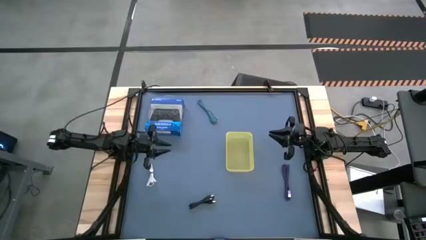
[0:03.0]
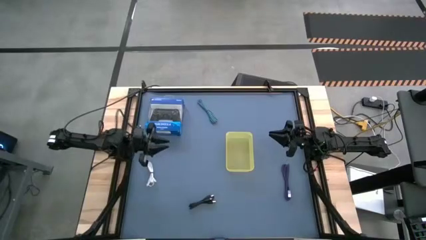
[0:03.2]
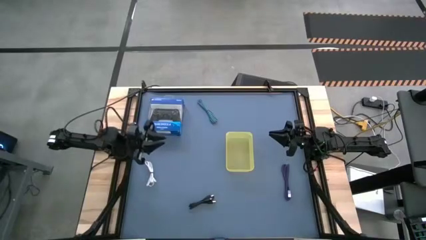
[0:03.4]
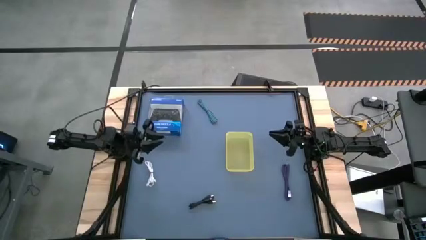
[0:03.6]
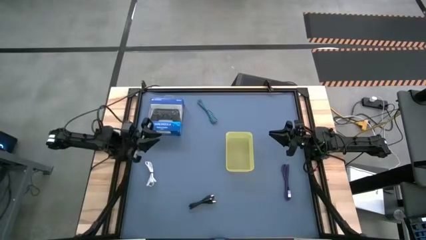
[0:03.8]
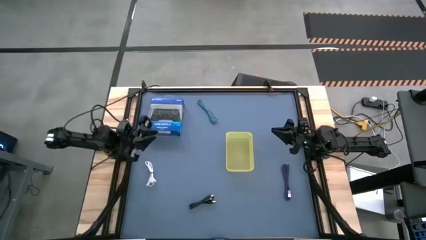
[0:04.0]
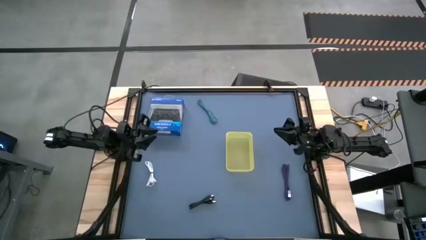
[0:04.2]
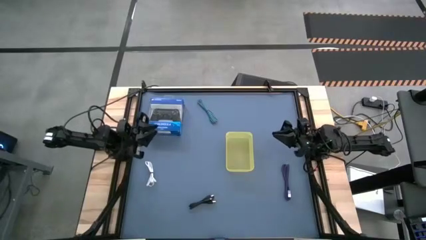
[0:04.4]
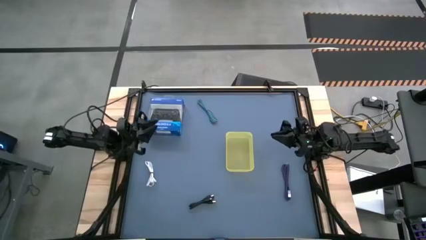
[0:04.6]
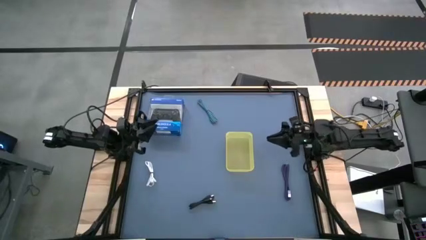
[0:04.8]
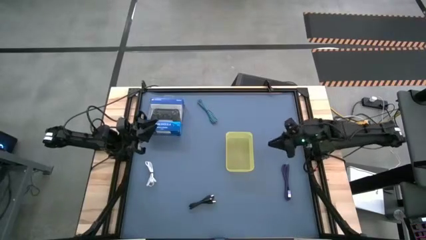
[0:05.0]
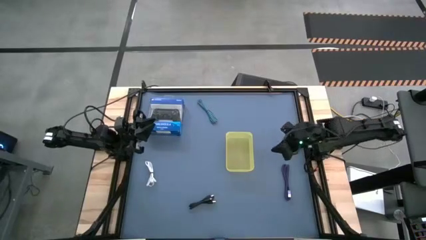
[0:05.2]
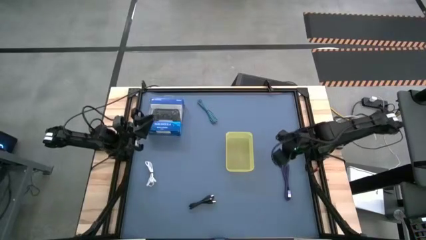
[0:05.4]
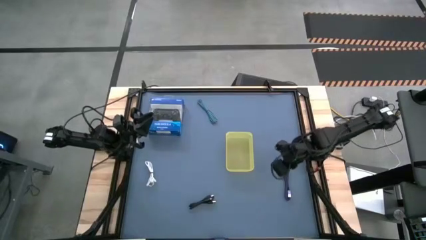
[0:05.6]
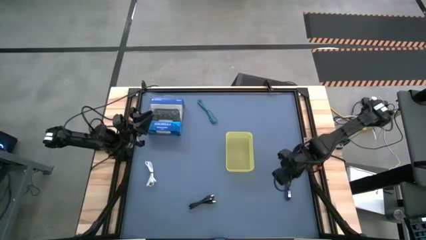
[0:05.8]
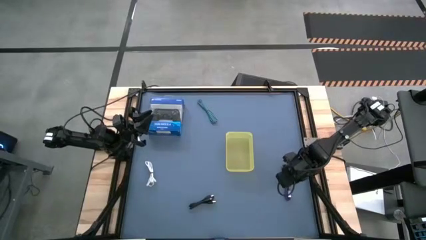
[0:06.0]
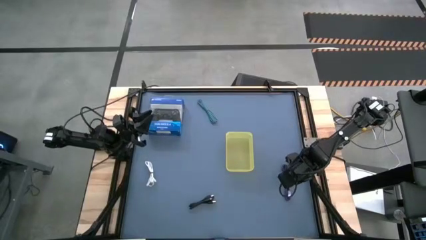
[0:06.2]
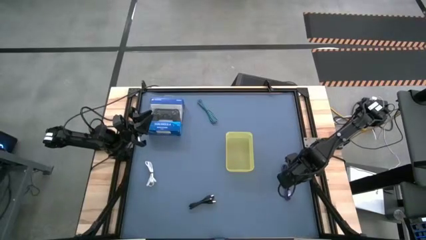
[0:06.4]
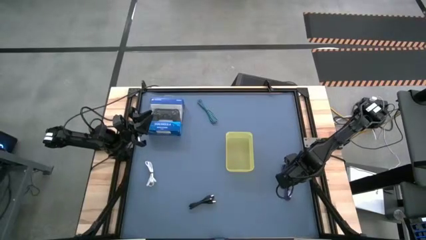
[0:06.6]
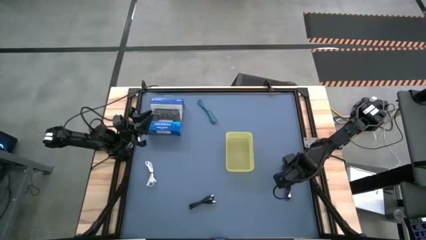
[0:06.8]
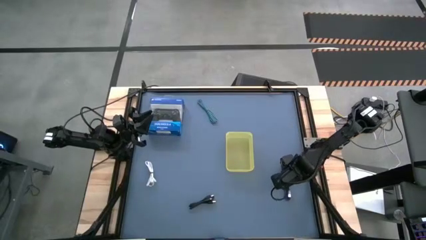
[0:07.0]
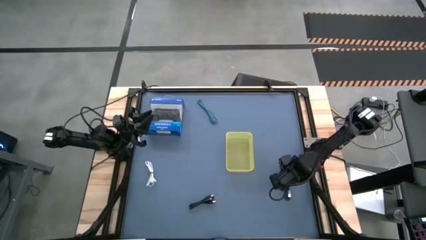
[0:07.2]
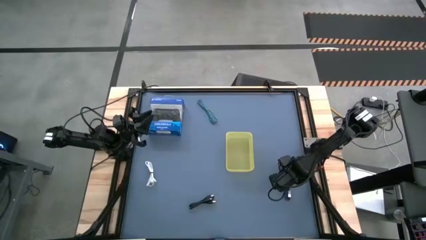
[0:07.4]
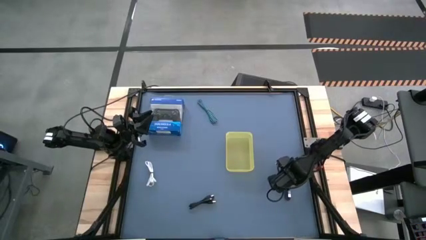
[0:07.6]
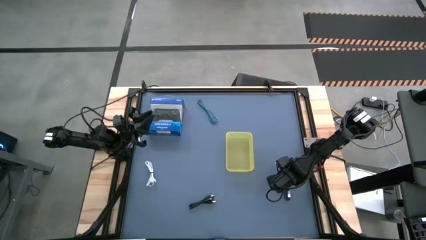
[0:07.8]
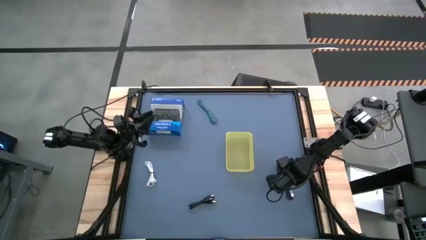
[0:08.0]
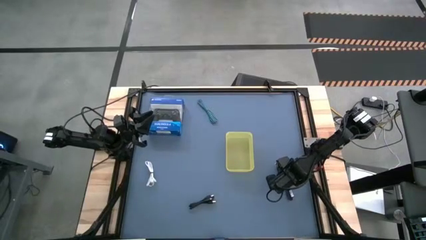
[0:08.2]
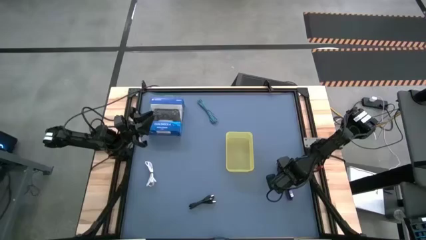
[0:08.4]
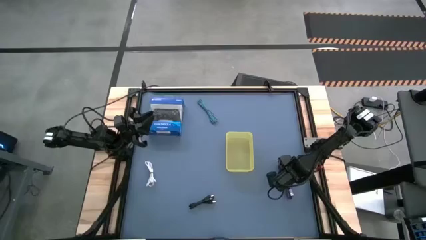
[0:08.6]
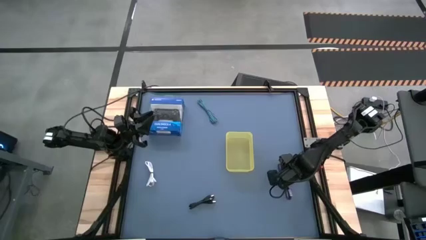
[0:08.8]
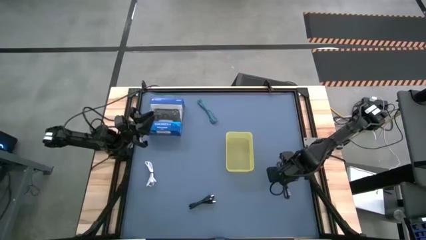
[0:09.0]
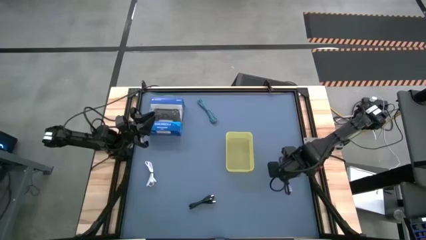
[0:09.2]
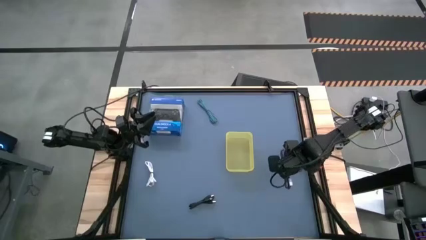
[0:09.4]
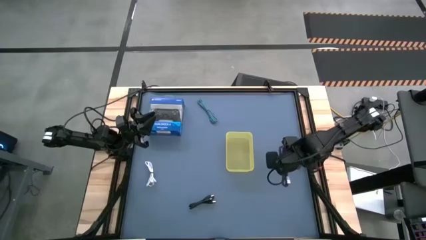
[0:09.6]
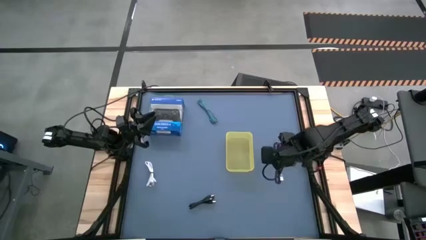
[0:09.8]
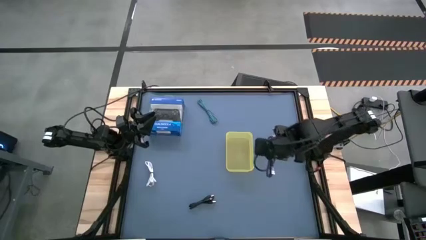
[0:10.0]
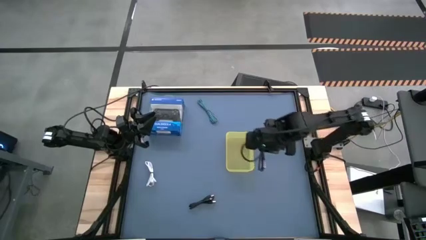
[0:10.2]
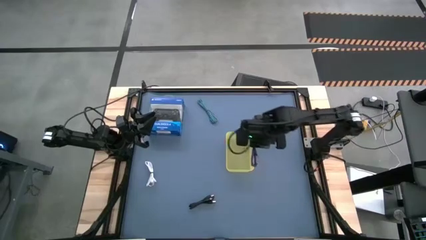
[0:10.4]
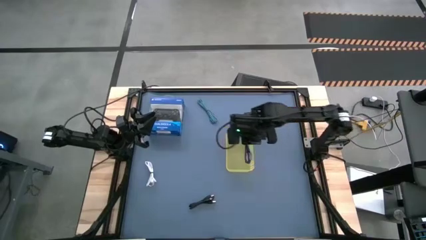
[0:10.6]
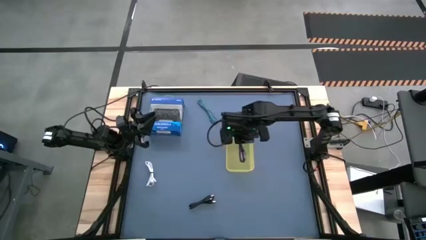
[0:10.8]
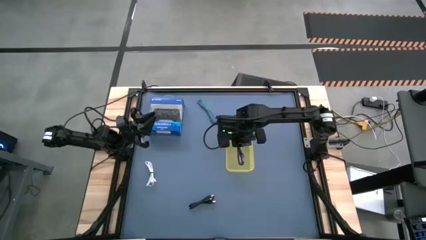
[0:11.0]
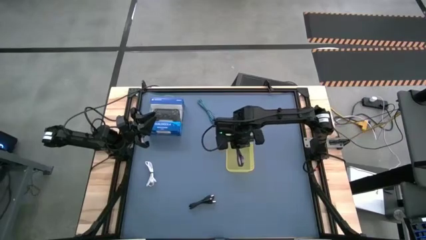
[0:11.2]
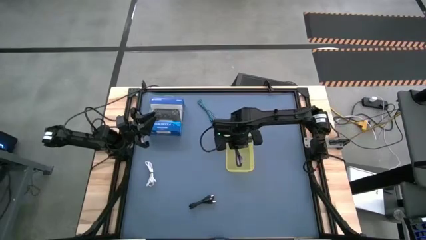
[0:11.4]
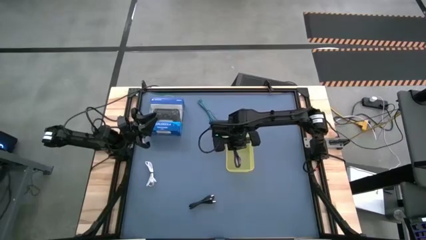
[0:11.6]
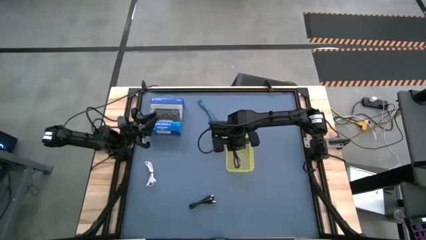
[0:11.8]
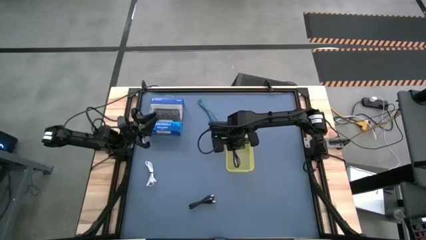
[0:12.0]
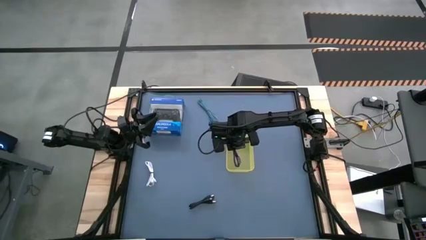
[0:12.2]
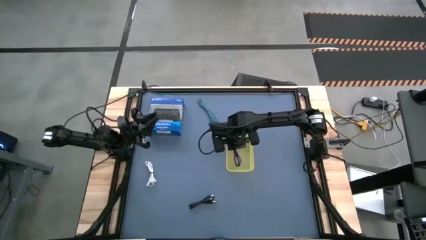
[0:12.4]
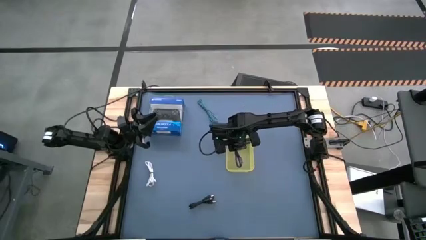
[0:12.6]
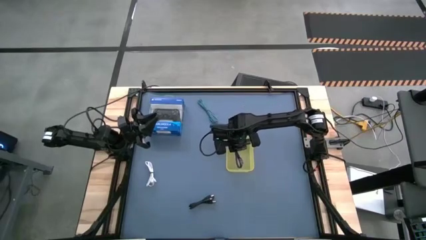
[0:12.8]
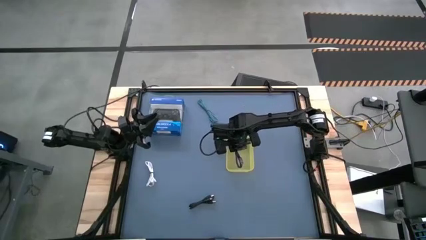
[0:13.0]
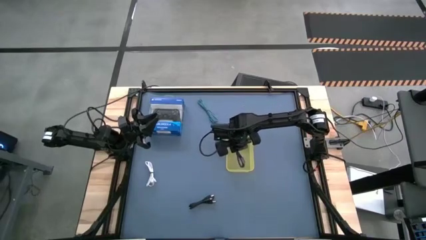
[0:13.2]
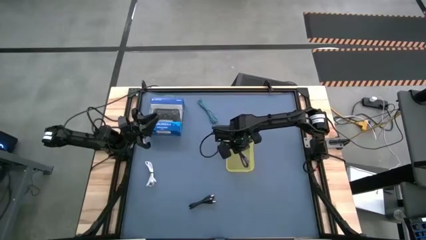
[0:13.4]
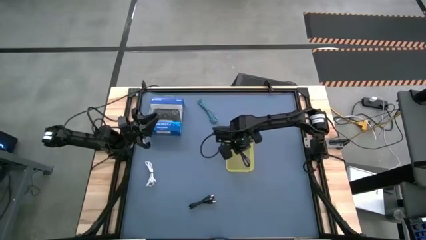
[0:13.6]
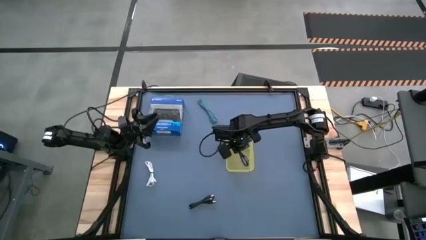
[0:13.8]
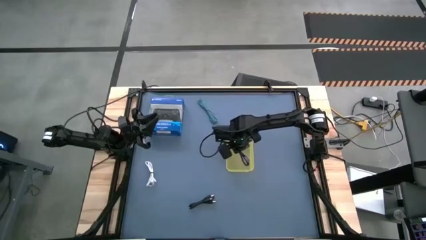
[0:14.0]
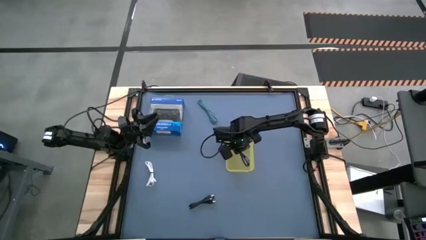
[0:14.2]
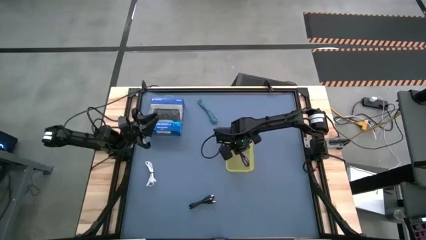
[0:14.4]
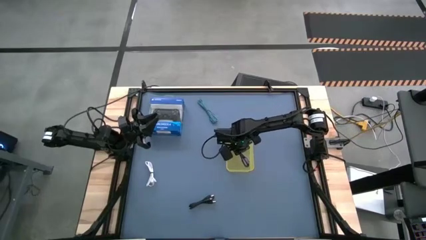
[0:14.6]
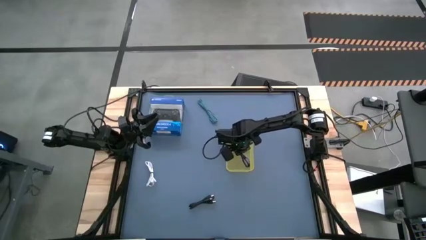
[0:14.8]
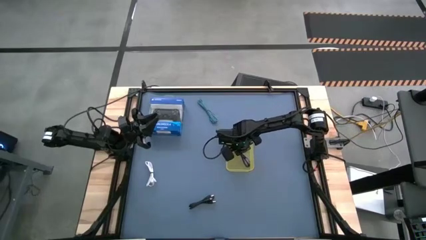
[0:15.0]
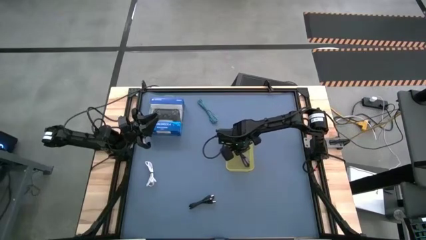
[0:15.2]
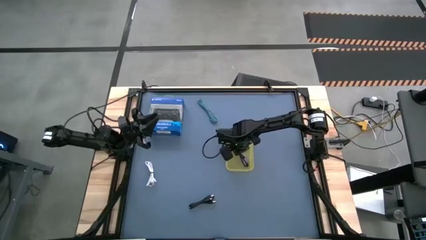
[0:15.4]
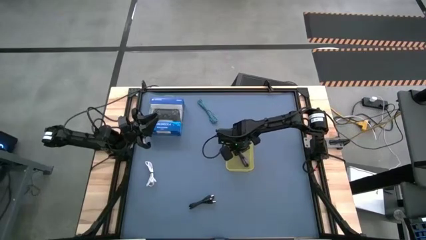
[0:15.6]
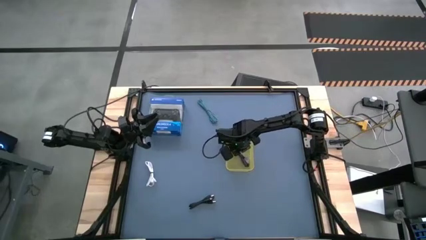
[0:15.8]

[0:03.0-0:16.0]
Task: Pick and place USB-C Cables
Put the black purple charger cable into the yellow bin

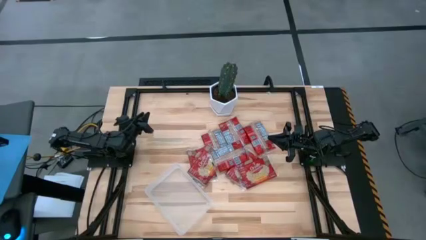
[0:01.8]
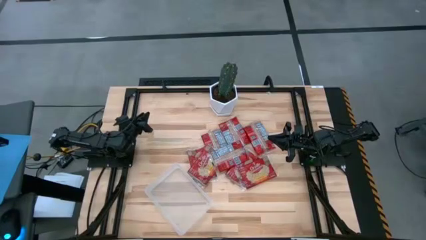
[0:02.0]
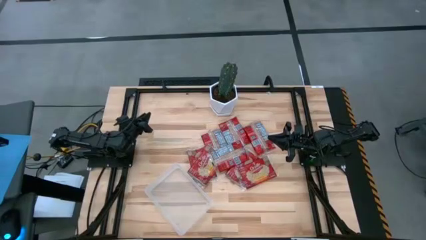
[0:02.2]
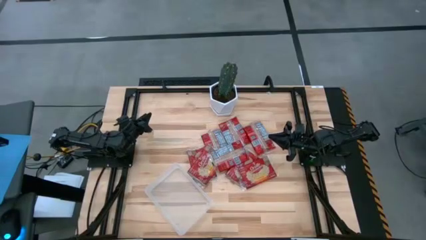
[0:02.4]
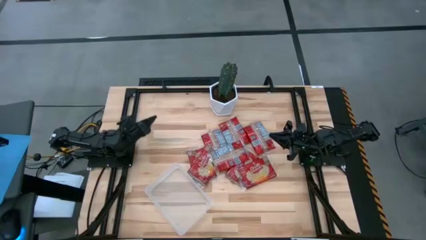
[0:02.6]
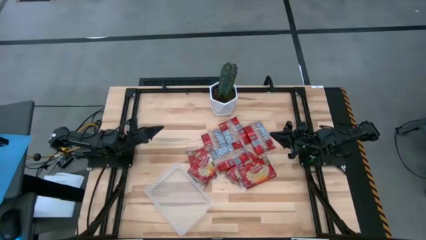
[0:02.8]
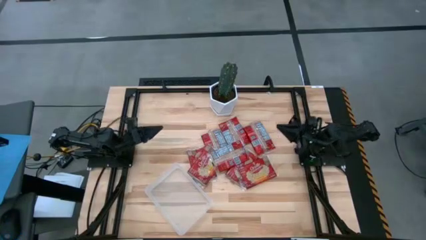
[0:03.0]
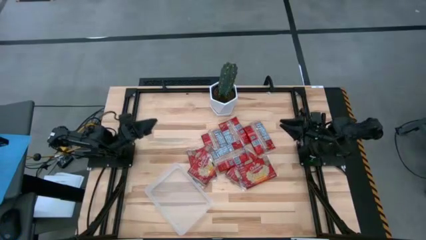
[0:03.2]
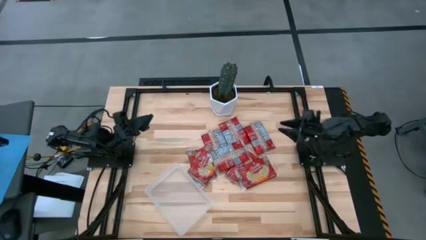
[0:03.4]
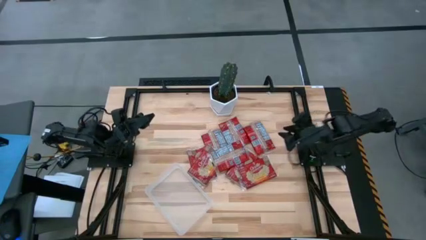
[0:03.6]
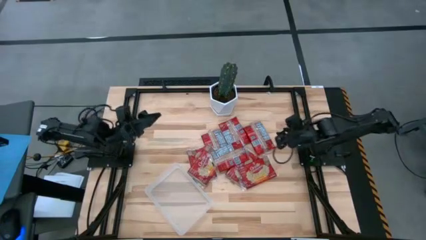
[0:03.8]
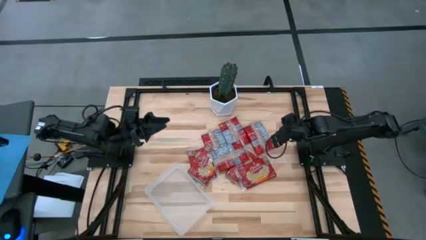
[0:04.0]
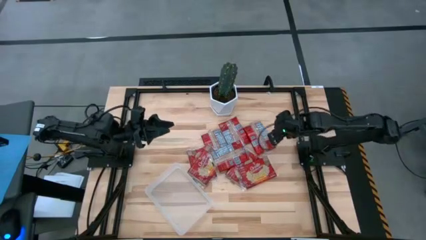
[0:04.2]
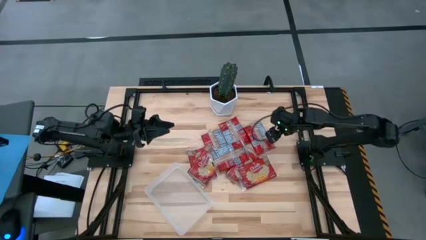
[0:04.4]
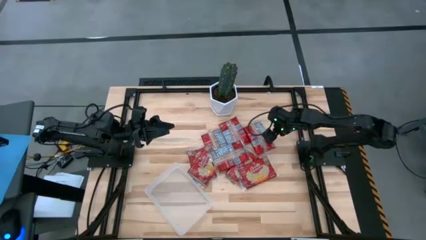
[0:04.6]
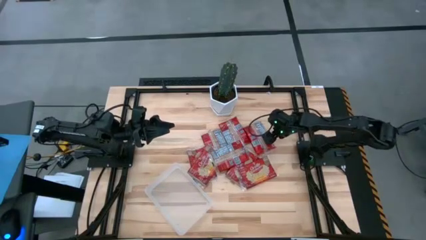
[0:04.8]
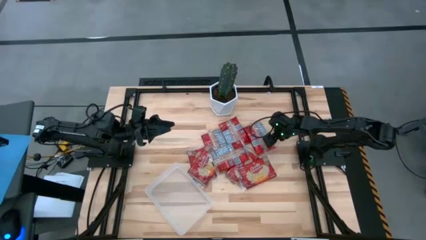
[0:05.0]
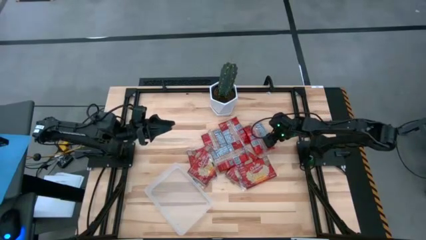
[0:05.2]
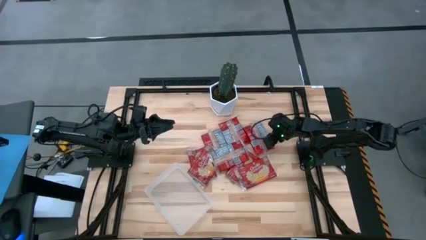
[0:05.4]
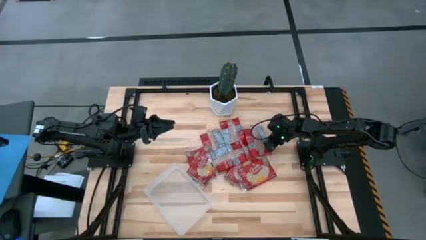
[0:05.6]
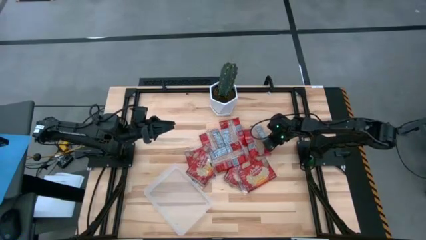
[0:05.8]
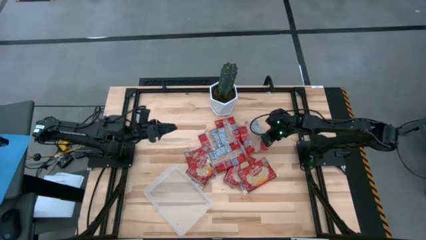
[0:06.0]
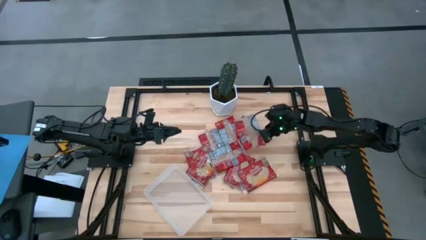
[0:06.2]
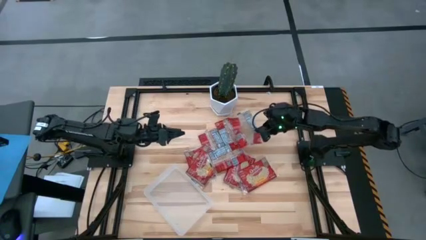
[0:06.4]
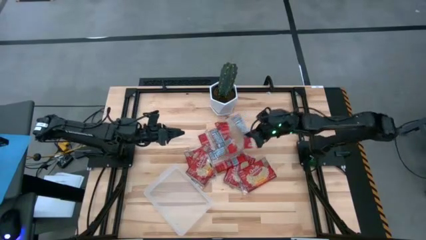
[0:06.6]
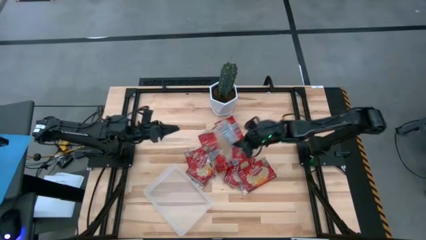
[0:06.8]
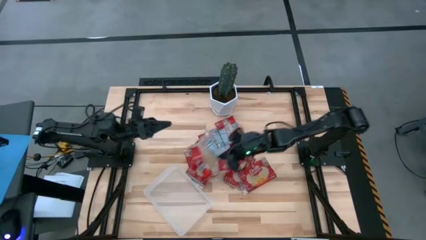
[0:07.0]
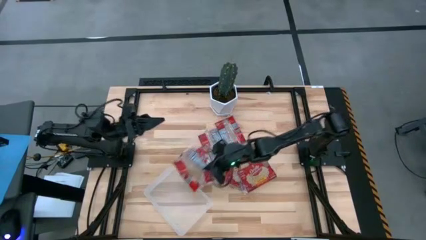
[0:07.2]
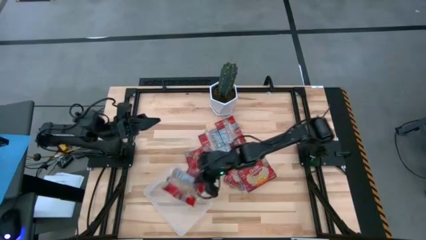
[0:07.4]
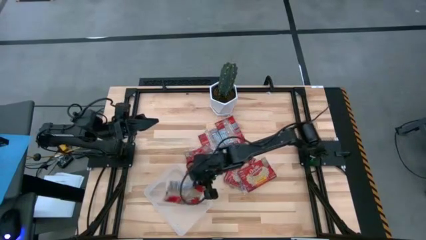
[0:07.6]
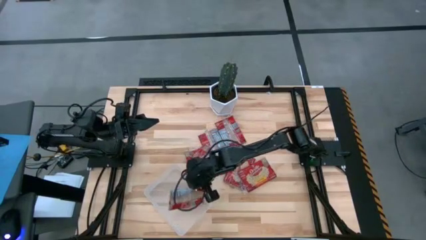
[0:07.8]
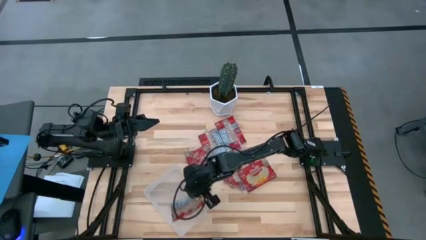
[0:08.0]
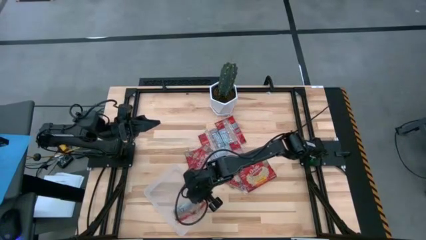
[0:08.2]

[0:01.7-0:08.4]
Task: Sort popcorn bags into baskets
Put the red popcorn bag into the transparent bin
